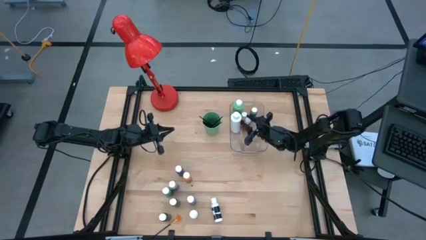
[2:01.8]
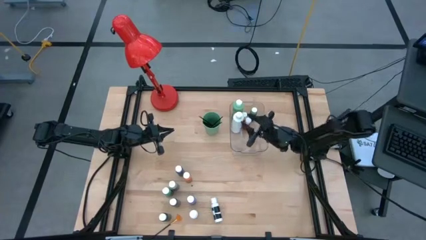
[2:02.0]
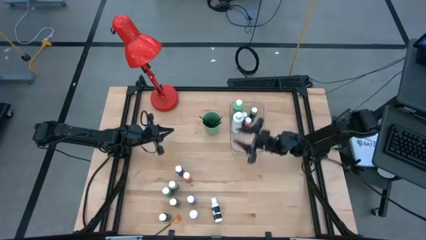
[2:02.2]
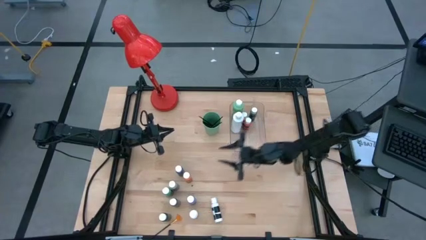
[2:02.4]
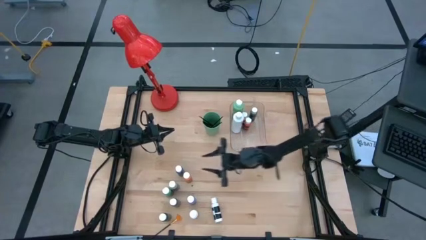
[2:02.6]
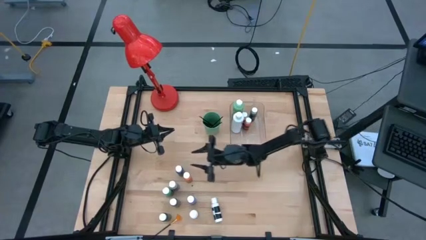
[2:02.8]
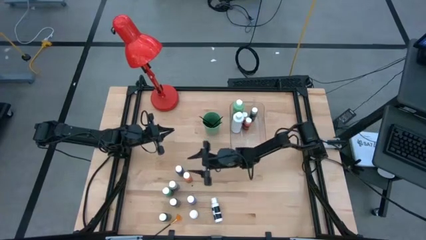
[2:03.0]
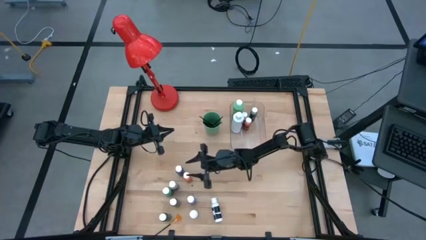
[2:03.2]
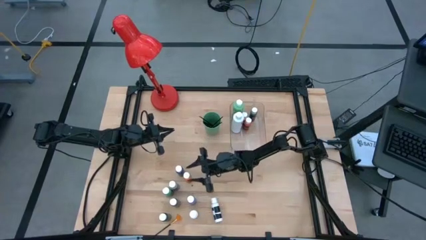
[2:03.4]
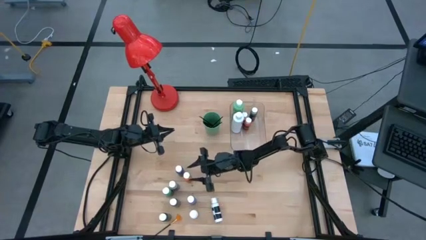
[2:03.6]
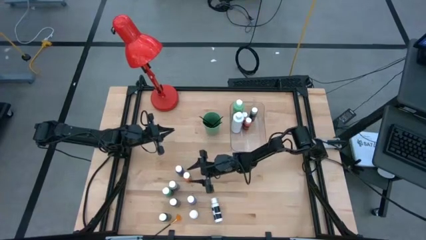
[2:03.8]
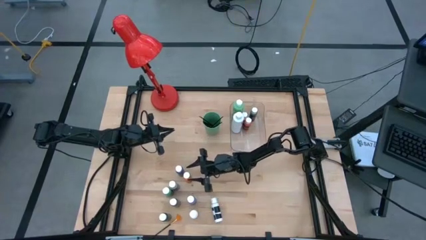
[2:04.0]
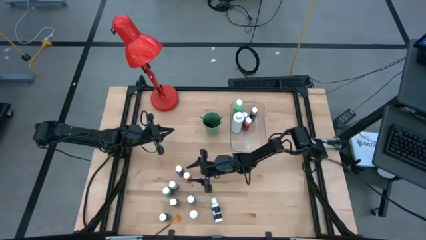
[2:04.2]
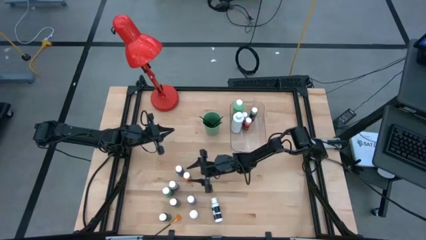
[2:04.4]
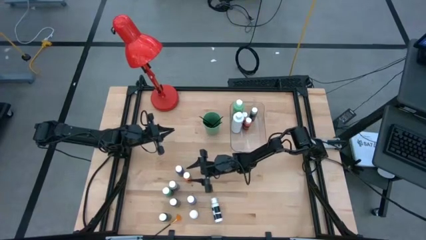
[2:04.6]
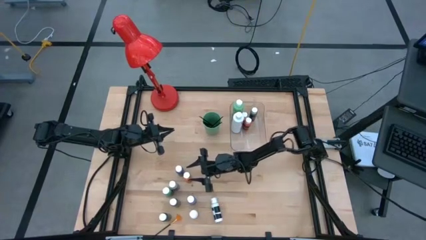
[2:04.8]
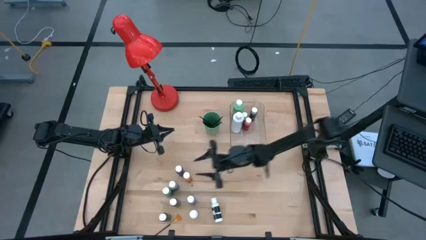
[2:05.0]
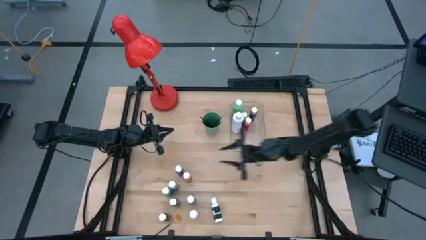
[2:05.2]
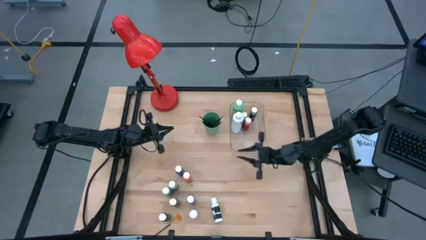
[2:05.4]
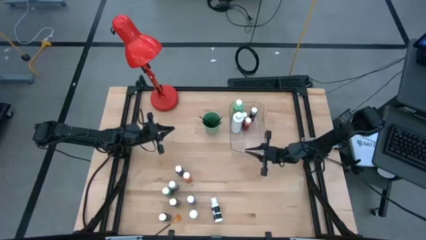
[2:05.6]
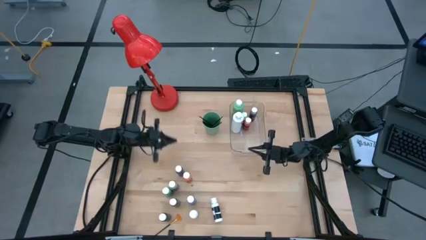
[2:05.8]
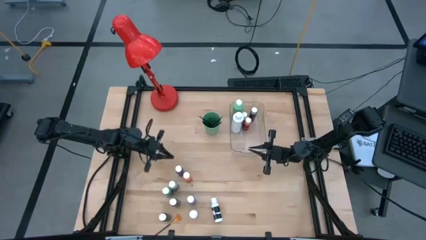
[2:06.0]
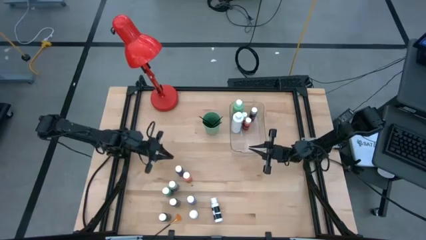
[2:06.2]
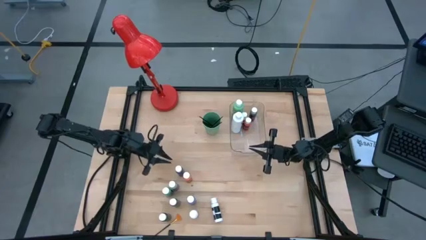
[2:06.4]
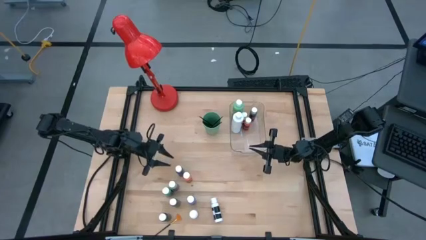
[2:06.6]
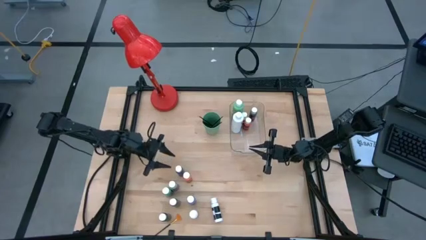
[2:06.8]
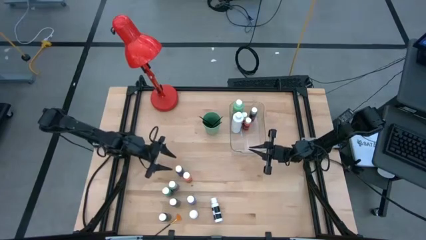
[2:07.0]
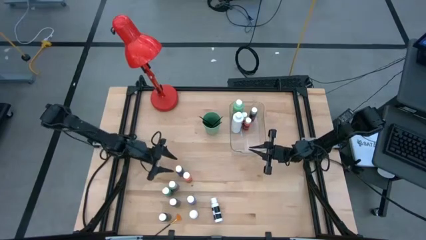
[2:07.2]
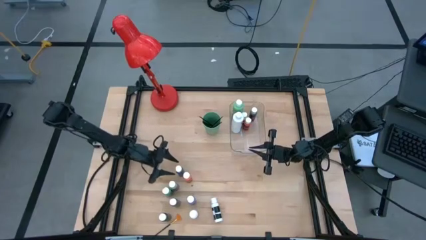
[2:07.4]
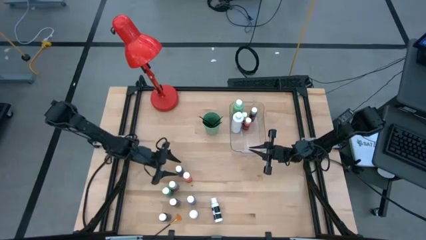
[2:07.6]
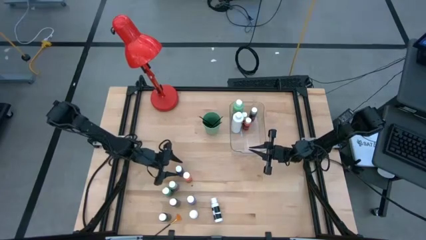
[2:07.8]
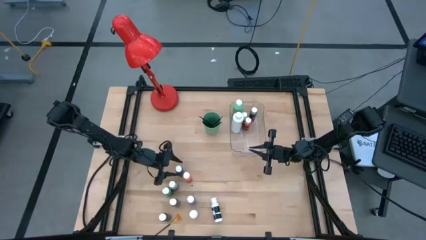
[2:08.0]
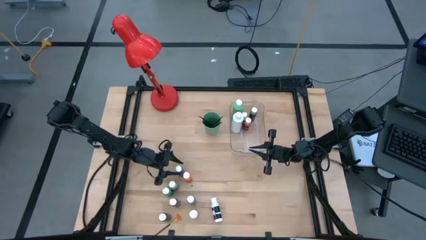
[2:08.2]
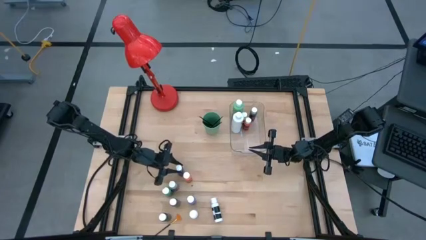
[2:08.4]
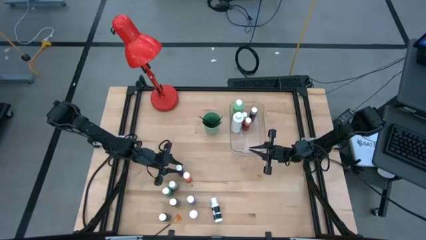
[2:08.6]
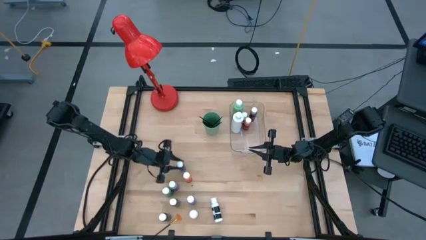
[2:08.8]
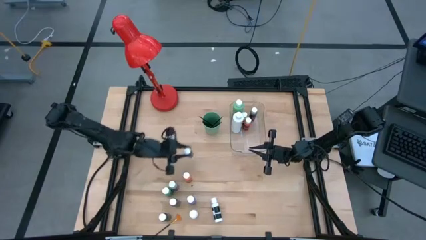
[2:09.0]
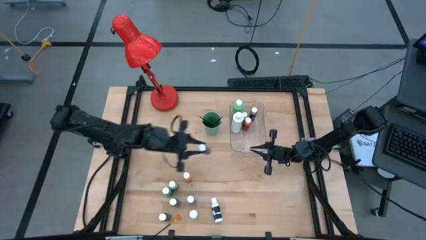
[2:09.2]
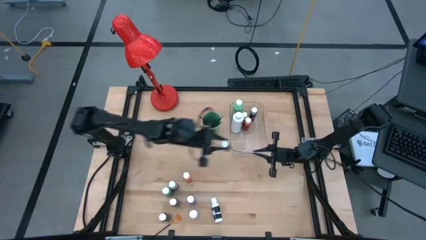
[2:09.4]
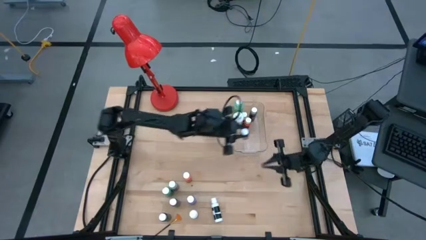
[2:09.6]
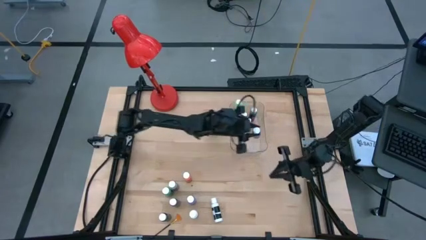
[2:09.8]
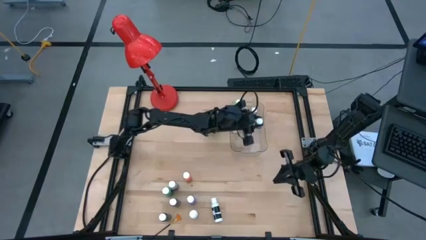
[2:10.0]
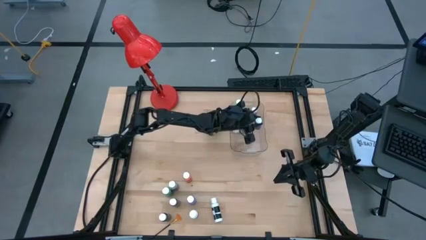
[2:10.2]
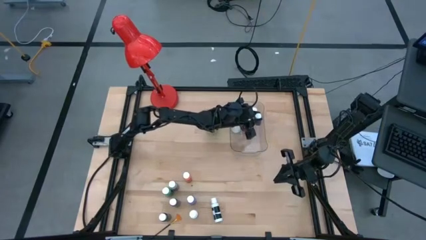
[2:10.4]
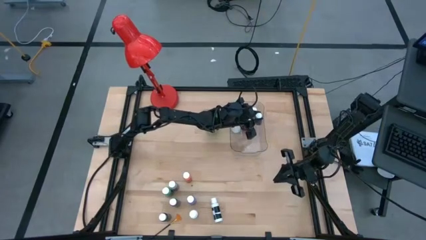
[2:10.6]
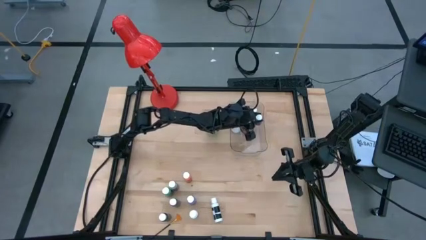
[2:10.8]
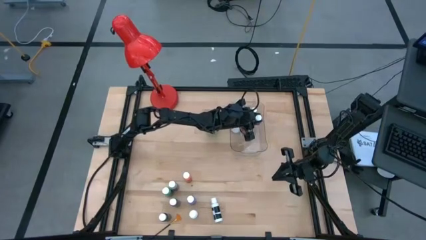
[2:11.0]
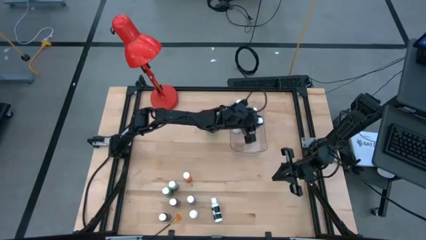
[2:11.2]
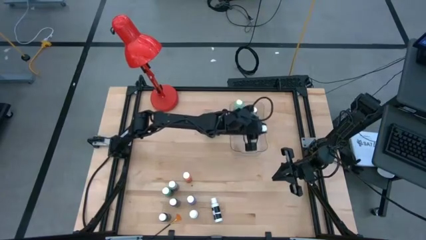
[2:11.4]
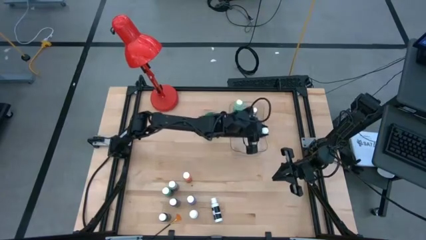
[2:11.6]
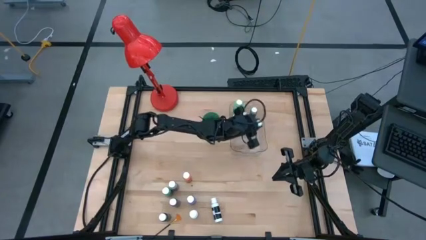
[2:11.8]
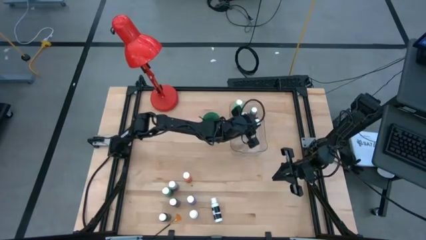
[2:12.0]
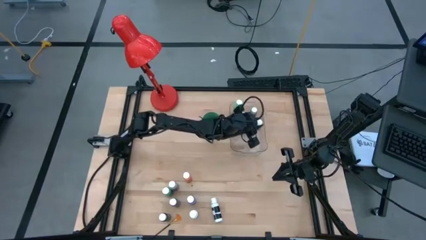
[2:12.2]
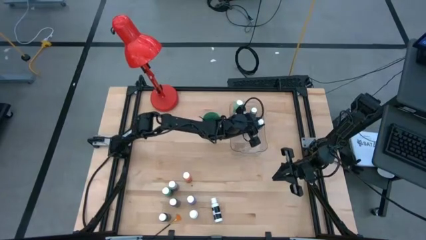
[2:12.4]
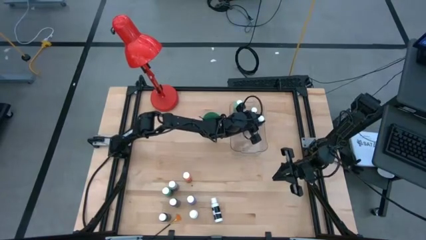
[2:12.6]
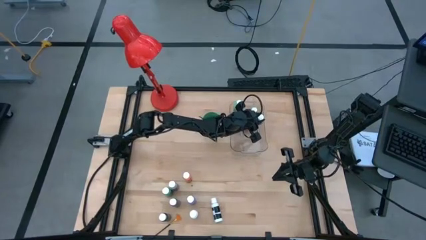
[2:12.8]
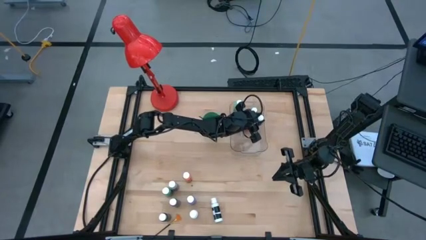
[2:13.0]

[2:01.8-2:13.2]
Task: Pick & Place Paint Supplies
Put the blue paint bottle into the transparent bin
